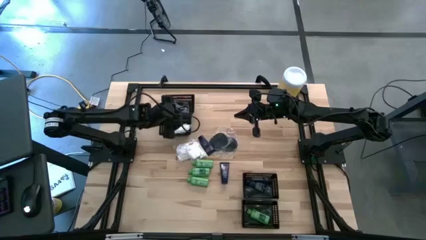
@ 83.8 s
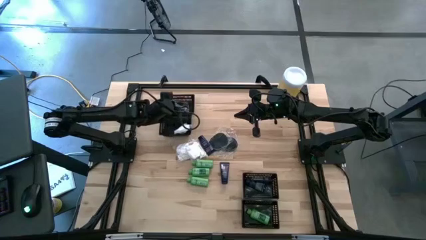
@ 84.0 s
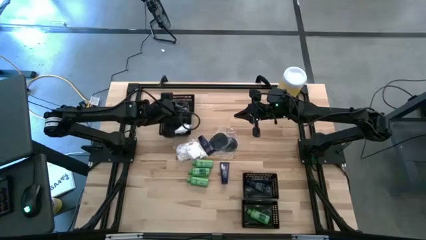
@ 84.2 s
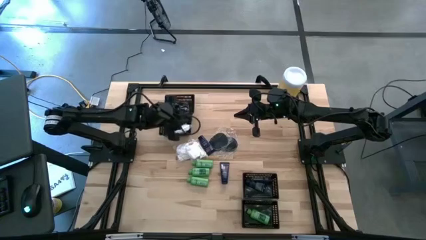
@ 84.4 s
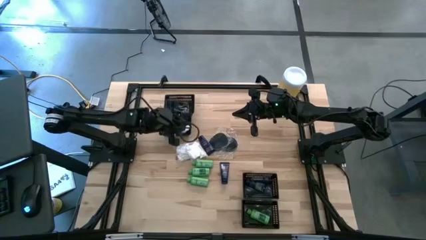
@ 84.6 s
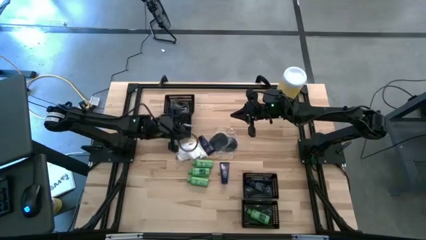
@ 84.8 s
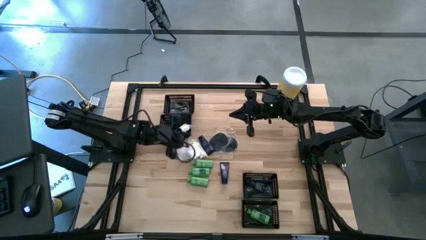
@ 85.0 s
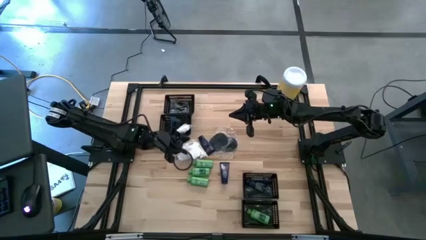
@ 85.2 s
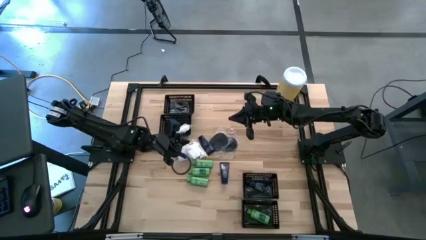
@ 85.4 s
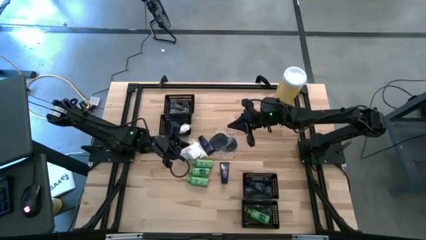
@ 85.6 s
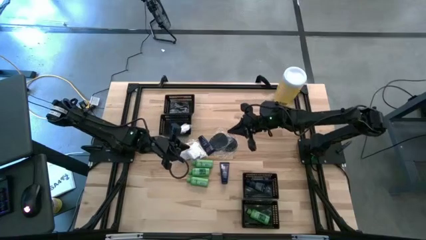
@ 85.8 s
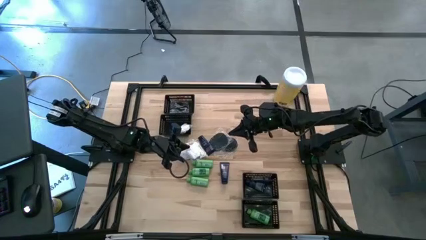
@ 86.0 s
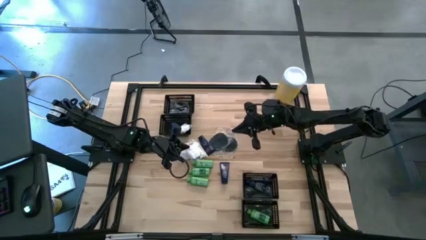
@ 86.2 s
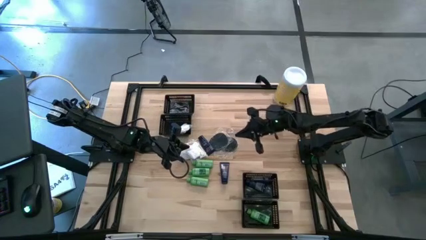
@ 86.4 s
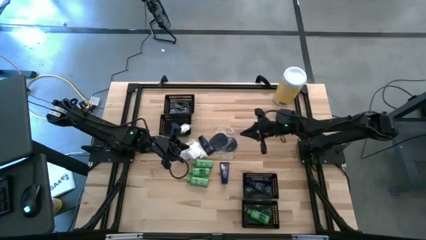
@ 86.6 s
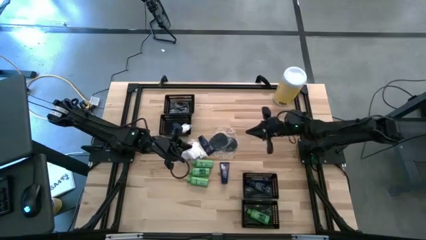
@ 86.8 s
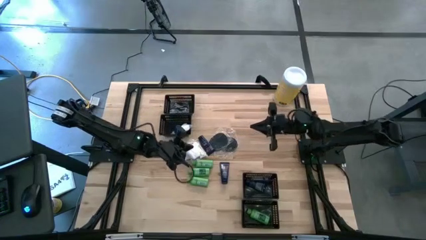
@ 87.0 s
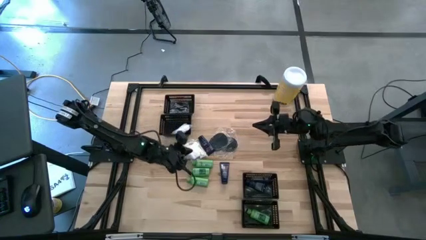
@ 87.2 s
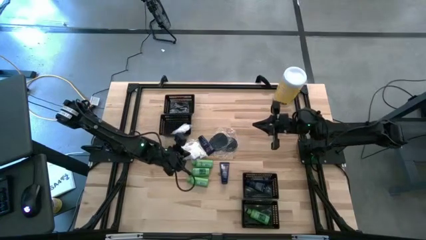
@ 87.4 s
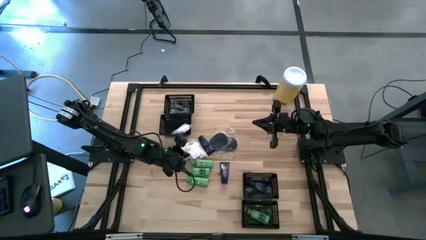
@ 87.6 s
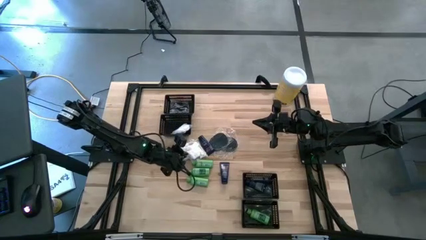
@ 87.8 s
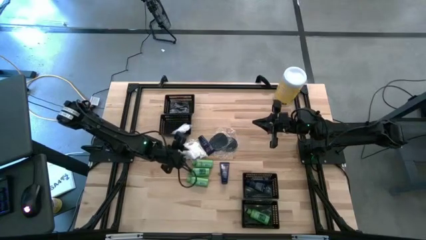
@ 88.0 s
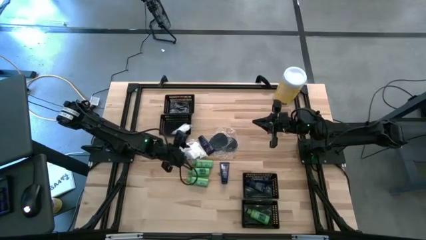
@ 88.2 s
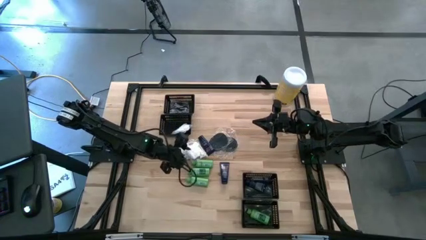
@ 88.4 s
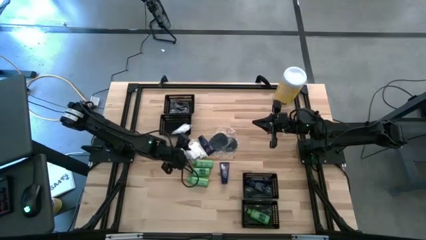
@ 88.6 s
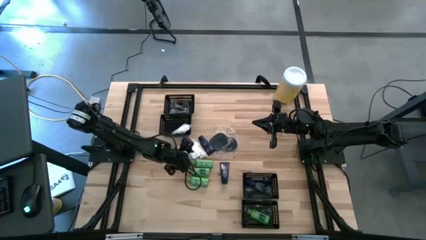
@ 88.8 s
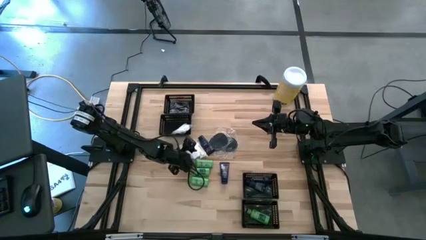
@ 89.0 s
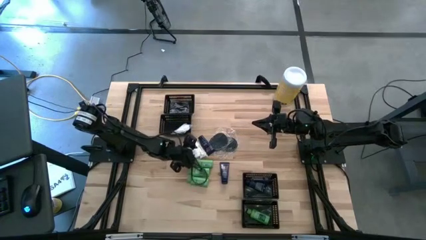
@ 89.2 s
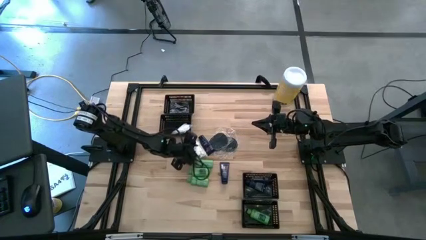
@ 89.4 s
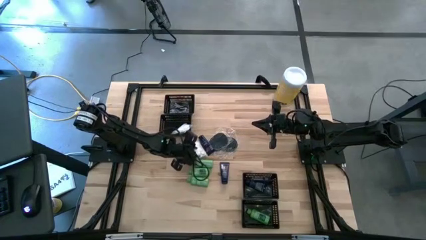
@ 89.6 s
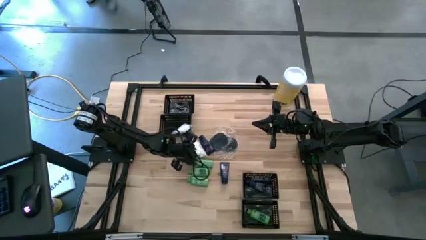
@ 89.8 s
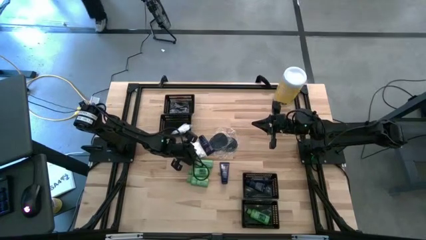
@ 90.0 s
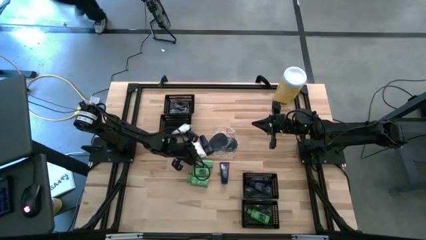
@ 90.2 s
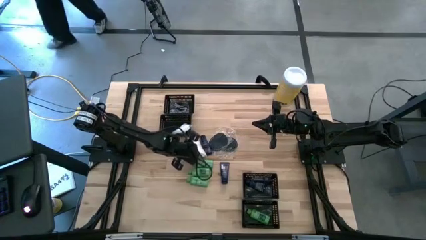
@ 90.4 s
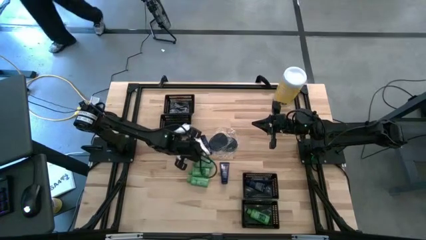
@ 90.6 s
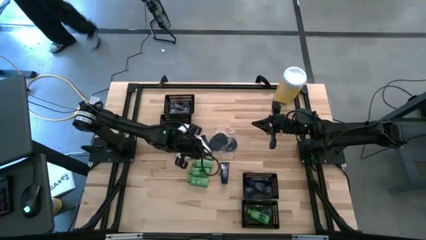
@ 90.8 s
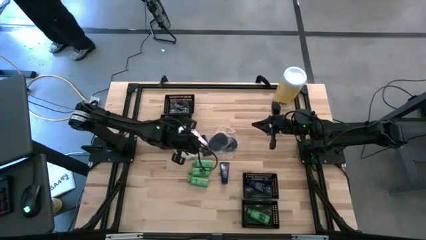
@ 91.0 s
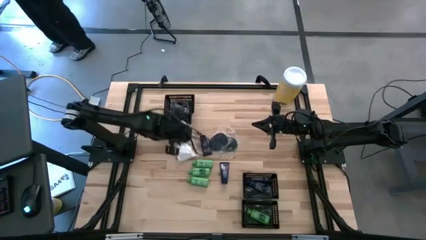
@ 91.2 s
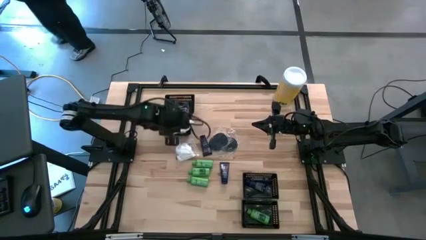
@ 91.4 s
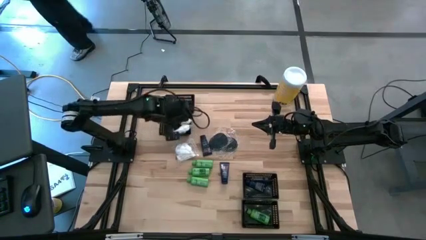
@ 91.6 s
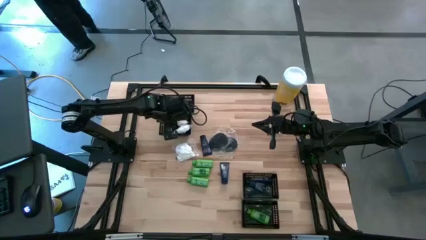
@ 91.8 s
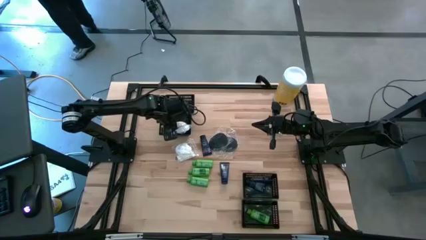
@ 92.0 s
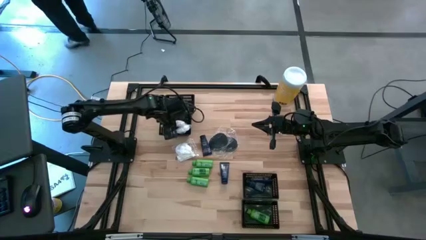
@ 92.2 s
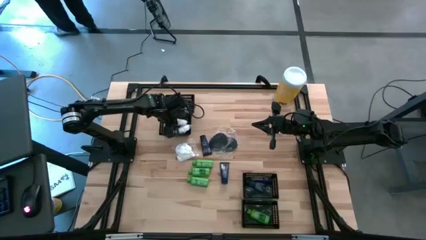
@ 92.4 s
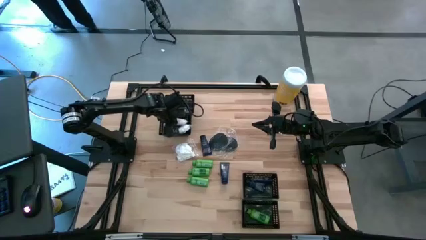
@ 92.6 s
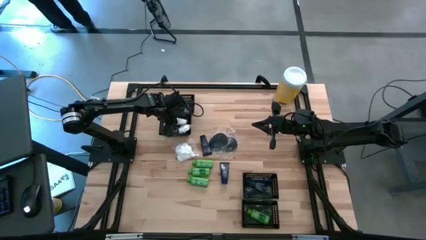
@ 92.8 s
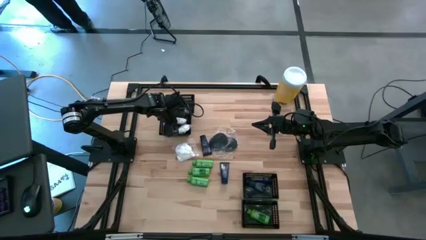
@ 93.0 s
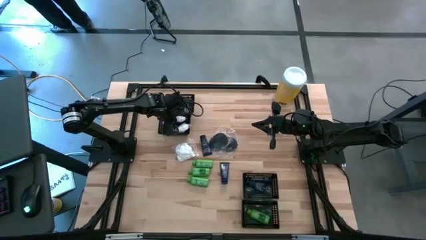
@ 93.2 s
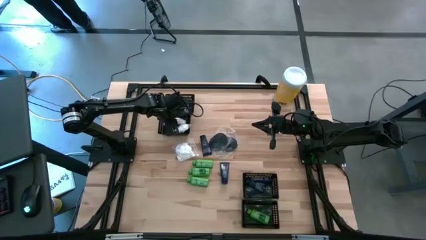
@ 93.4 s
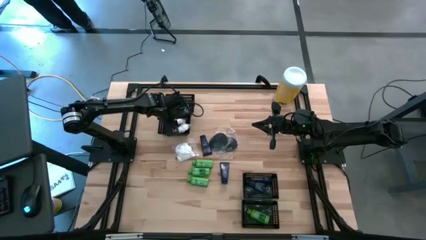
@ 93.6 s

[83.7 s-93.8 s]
Task: Pick & Place Travel size toiletries
Put the white cotton pack into the middle top black basket
